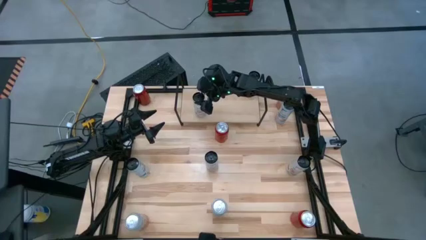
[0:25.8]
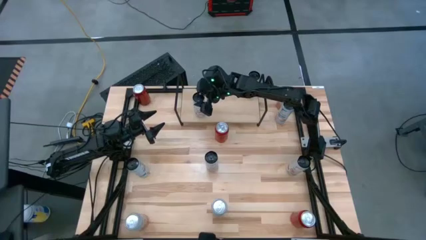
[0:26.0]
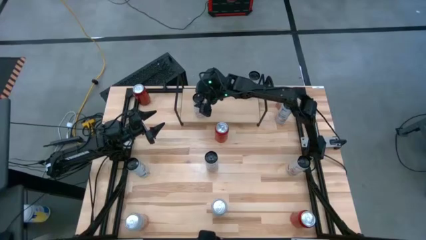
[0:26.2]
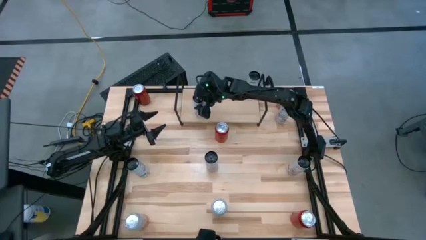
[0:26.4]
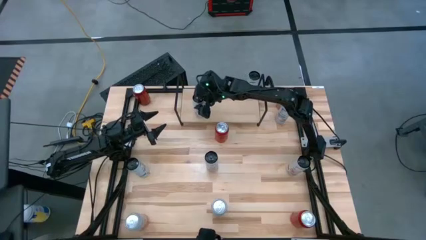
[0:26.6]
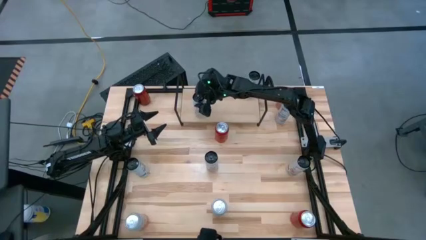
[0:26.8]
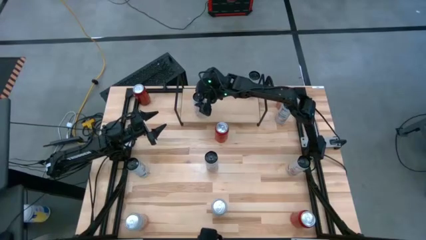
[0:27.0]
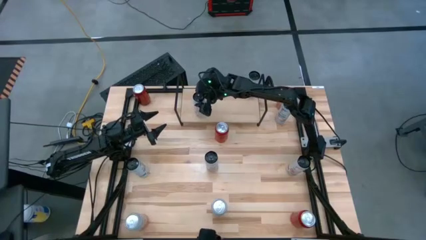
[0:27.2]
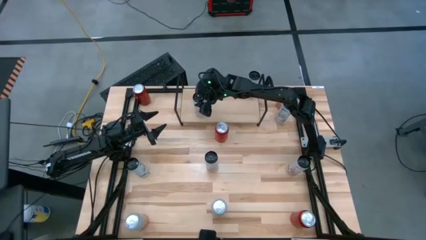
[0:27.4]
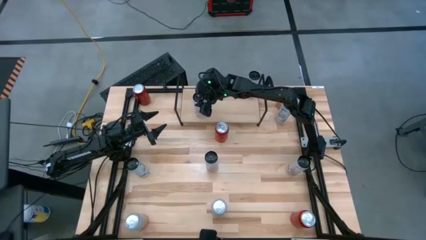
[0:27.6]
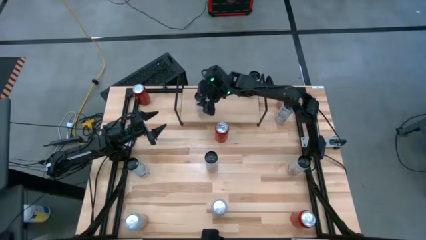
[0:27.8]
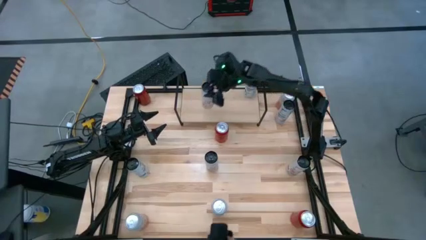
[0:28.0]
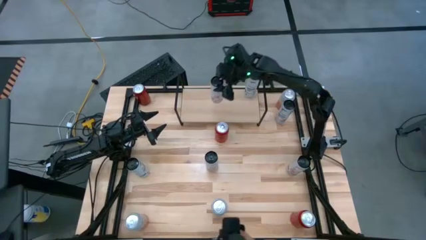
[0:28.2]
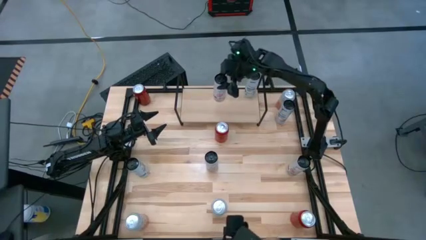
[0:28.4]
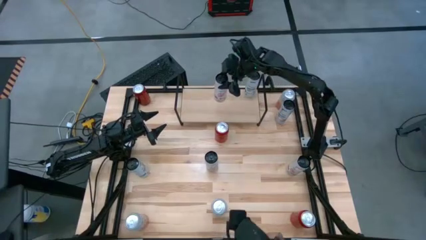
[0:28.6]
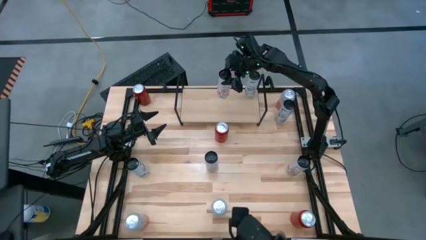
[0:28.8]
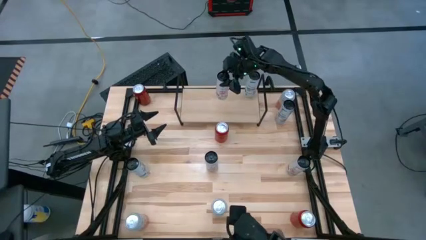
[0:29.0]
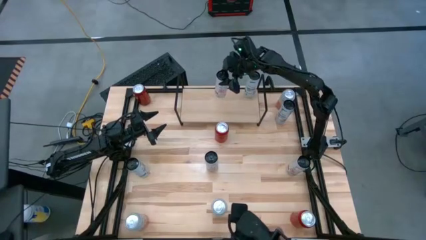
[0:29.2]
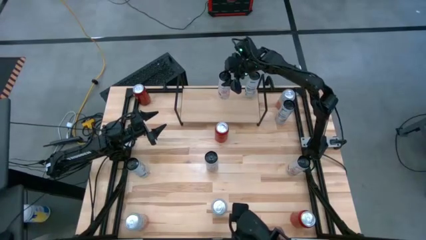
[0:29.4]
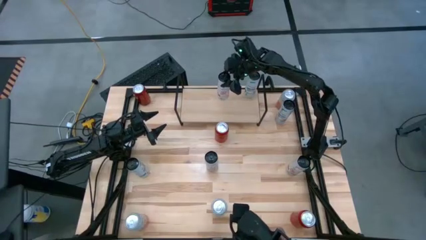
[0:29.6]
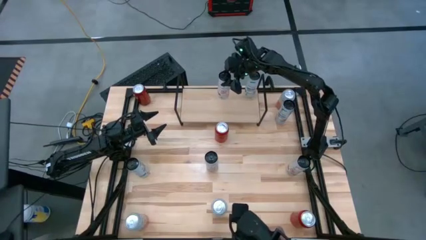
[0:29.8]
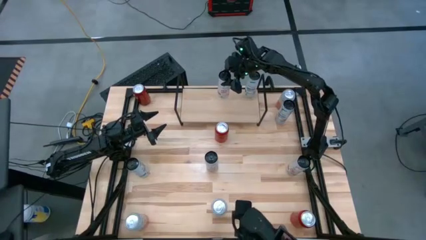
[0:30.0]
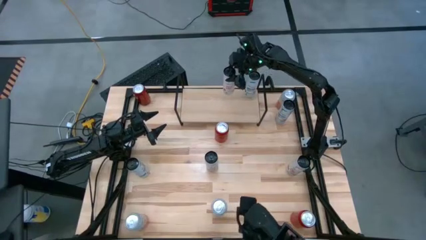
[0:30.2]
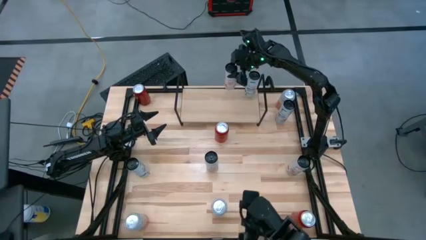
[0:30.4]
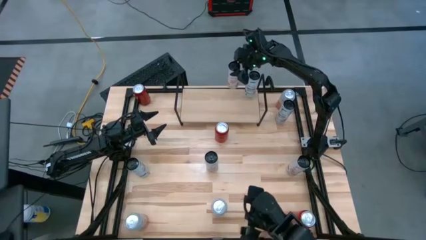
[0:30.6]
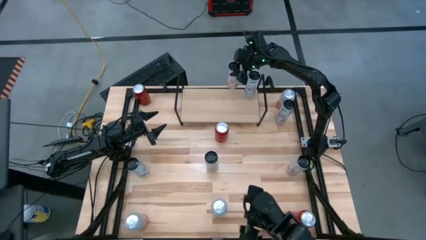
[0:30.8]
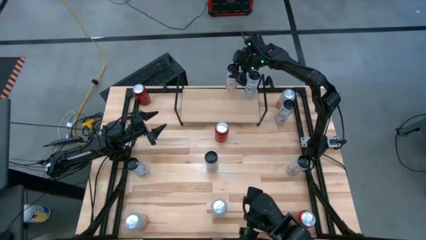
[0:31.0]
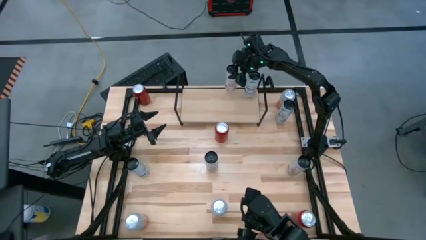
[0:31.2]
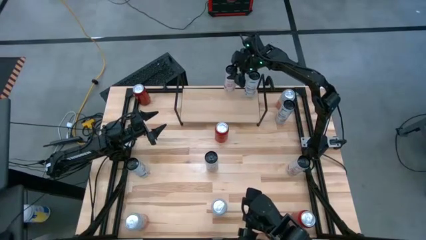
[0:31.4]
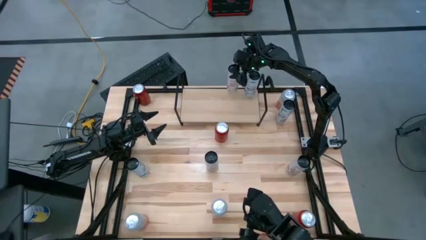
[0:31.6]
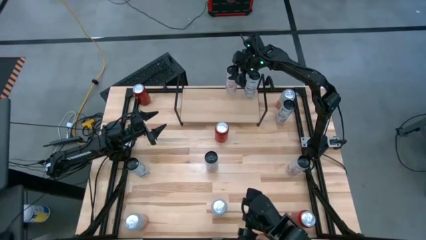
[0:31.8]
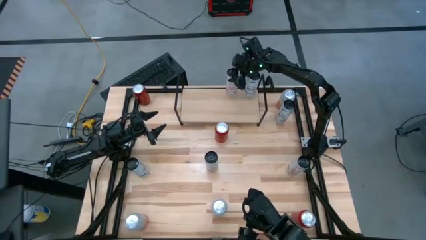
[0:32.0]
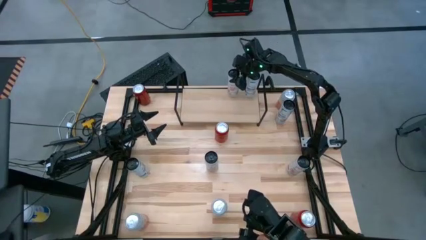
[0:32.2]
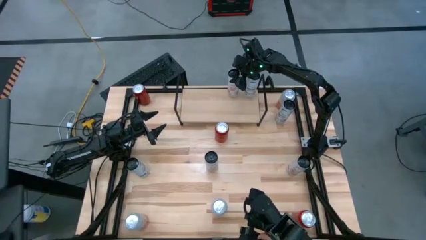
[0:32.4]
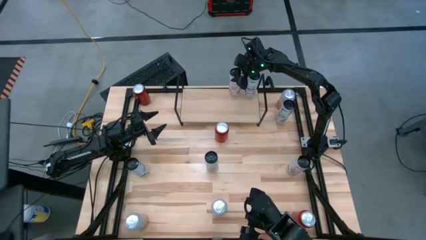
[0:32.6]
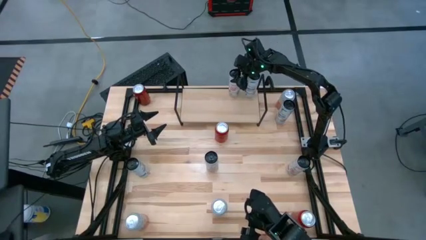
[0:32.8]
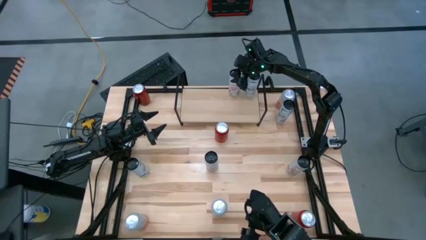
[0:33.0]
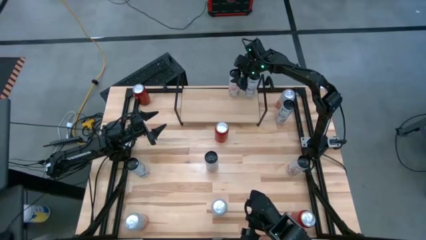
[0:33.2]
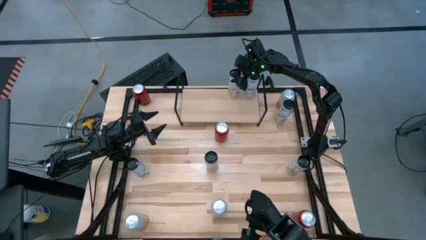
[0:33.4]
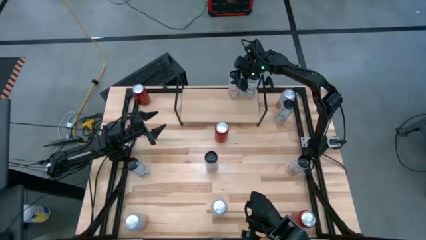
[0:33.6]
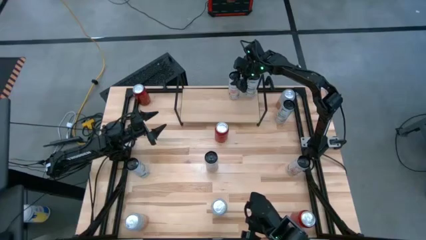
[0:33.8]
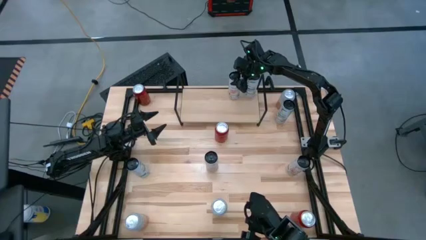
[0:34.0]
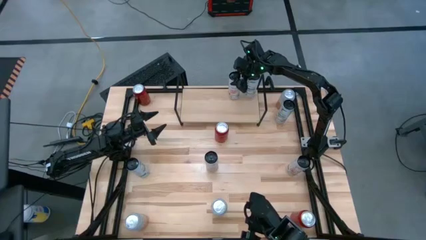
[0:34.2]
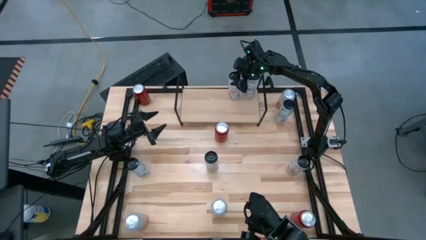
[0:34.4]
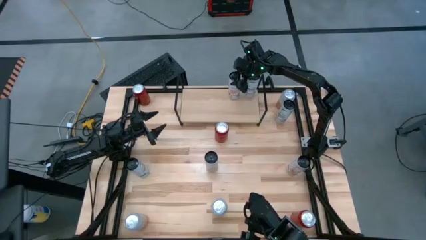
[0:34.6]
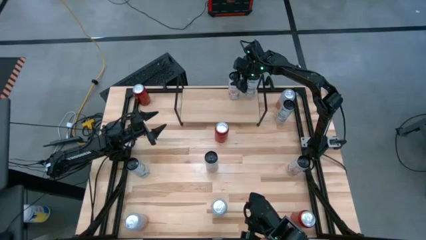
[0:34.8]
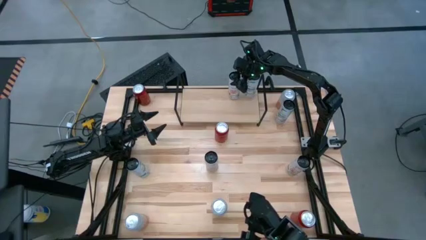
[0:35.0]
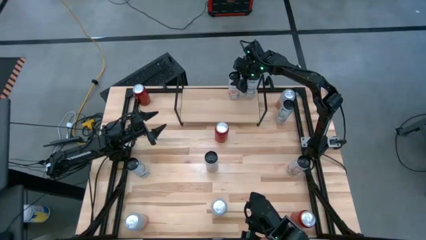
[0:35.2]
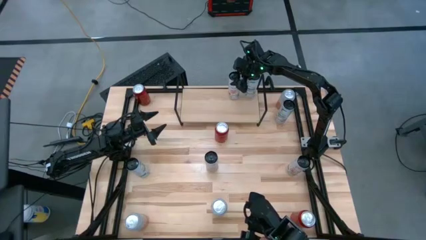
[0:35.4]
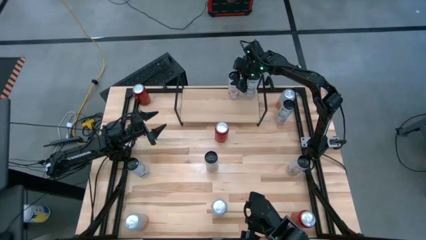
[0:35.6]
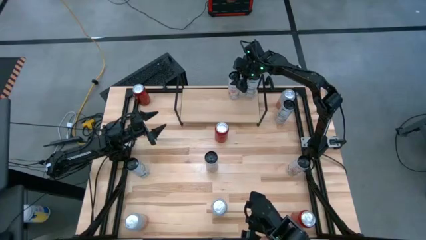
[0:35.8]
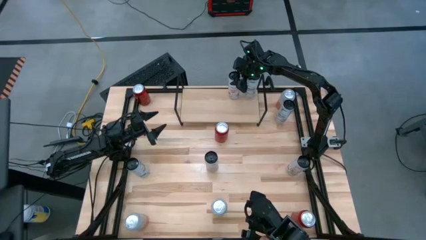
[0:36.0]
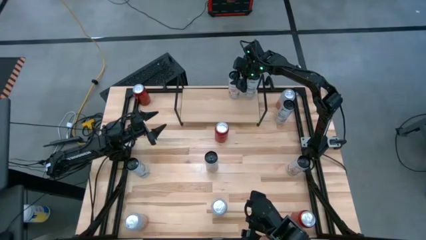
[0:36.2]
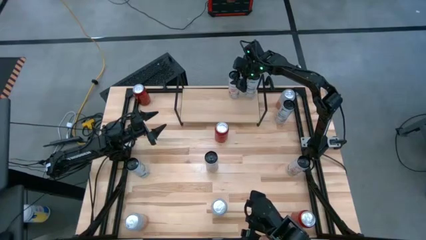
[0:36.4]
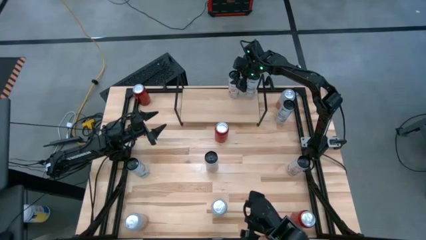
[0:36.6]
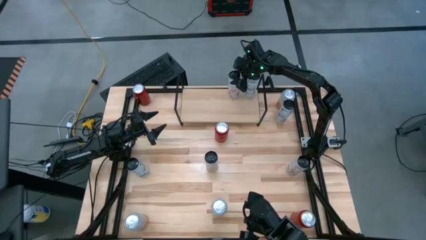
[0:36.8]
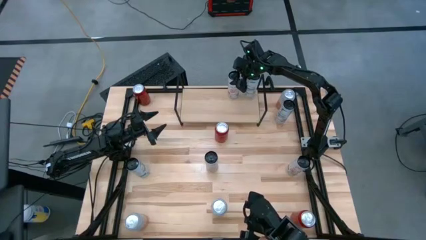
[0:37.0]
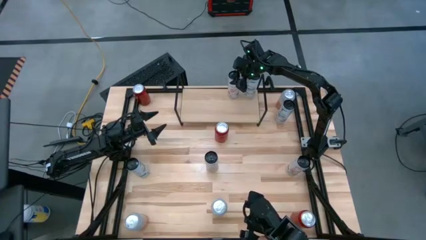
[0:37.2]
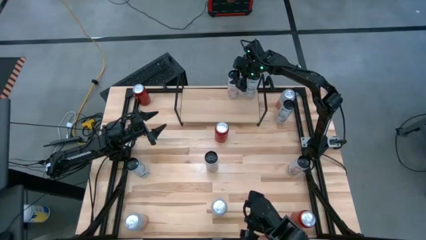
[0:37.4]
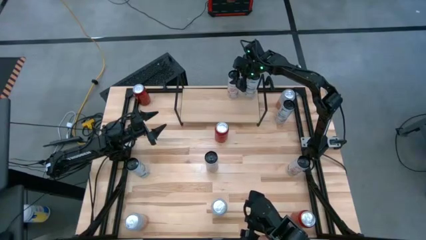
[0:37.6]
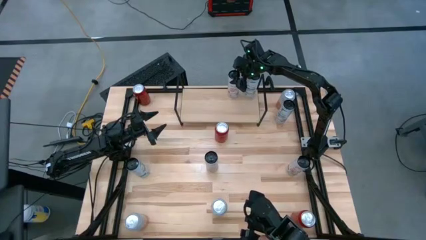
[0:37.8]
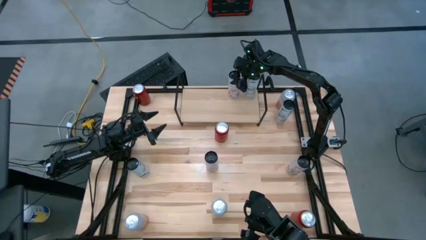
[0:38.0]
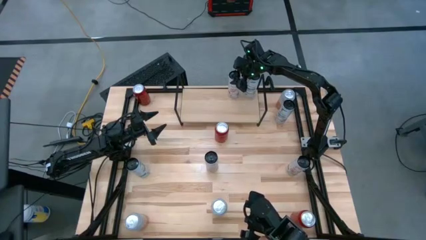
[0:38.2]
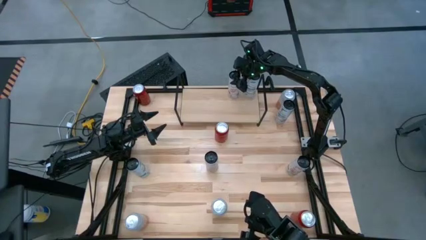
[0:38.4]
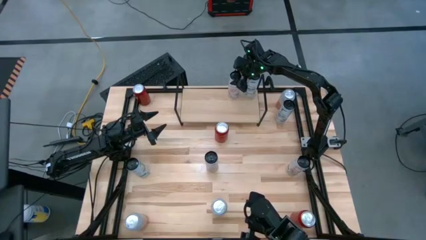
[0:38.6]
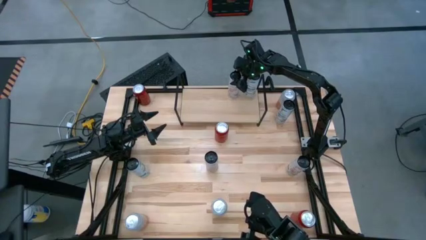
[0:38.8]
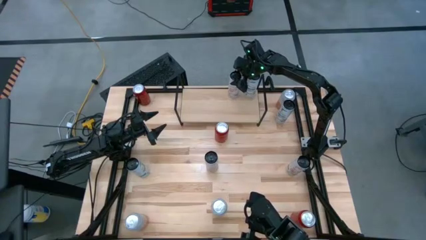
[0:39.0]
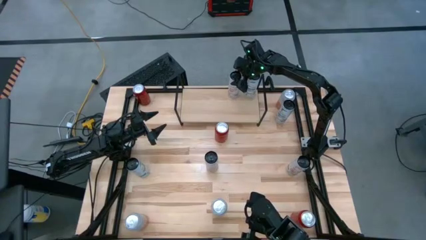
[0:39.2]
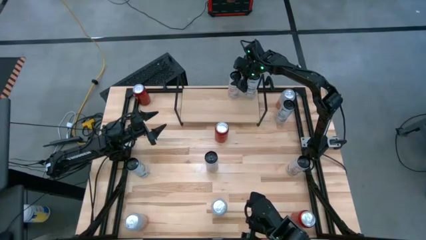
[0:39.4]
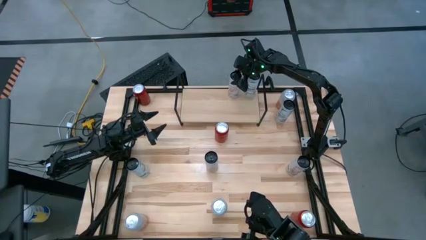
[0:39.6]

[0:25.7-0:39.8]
Task: Place canned beverage on shelf
Put the top left white pink soda can on the shelf

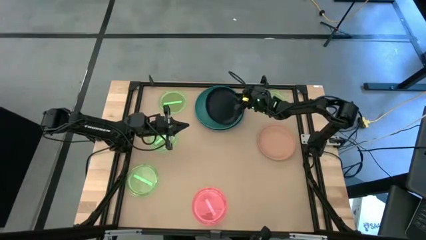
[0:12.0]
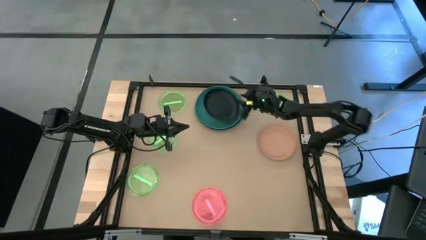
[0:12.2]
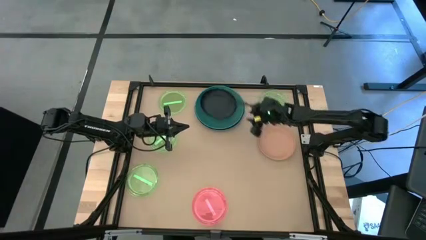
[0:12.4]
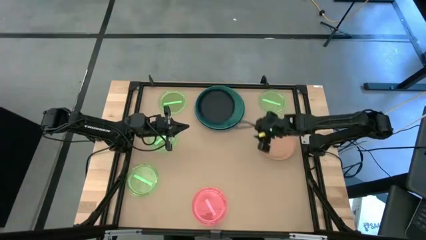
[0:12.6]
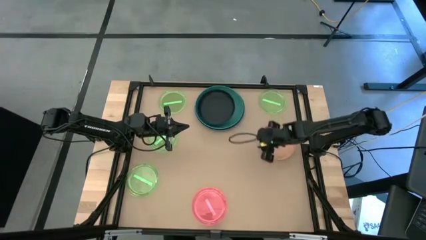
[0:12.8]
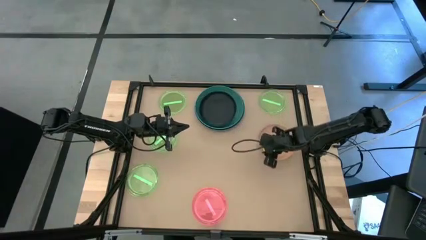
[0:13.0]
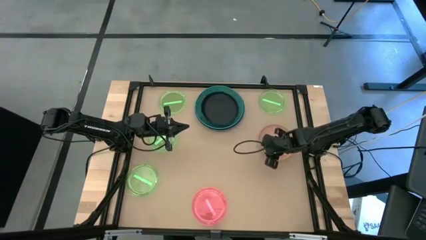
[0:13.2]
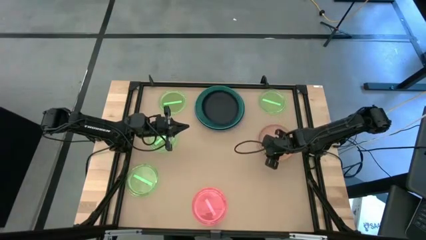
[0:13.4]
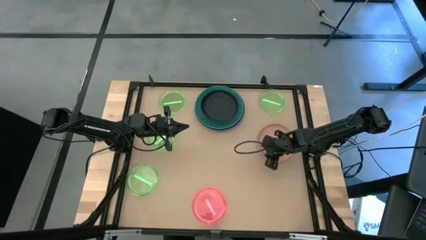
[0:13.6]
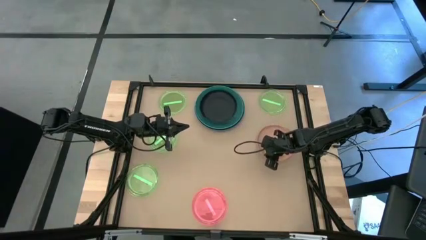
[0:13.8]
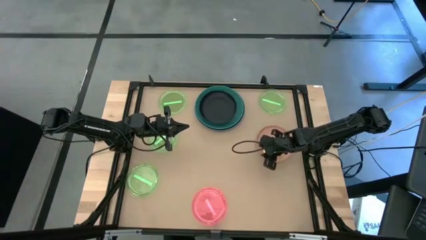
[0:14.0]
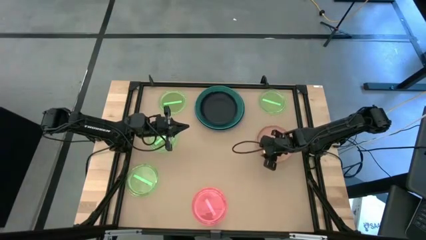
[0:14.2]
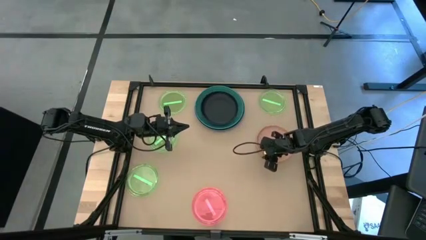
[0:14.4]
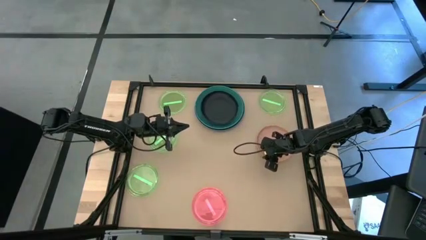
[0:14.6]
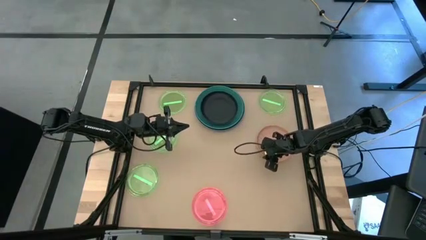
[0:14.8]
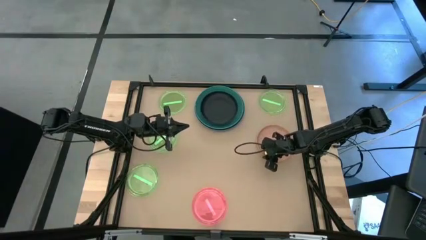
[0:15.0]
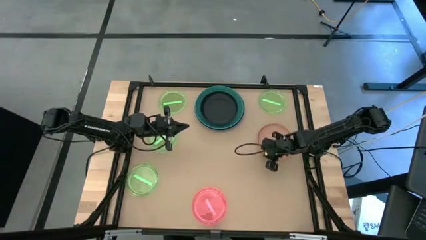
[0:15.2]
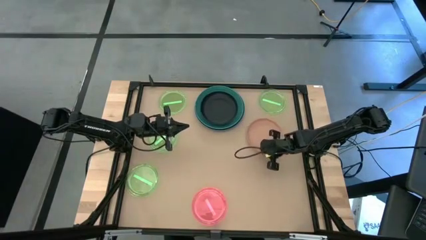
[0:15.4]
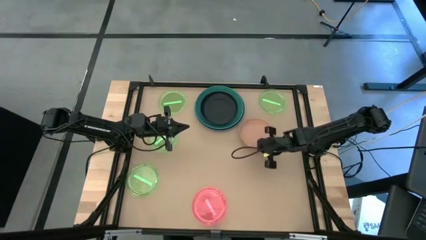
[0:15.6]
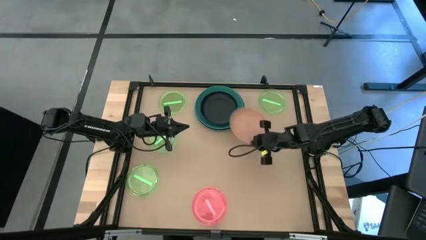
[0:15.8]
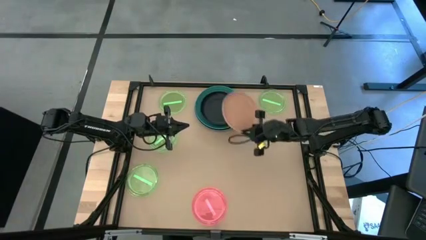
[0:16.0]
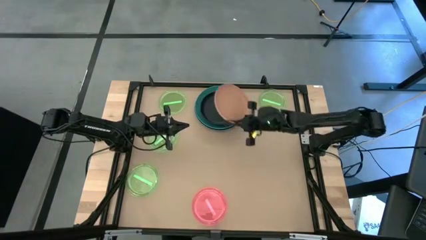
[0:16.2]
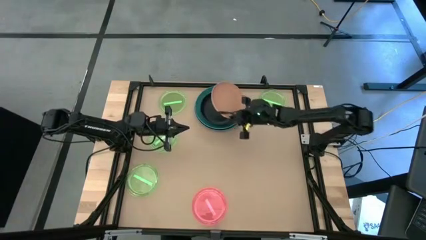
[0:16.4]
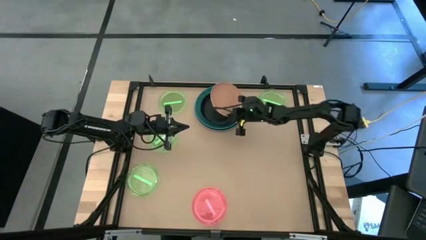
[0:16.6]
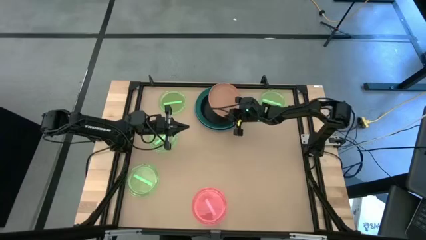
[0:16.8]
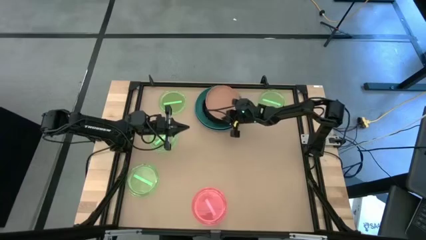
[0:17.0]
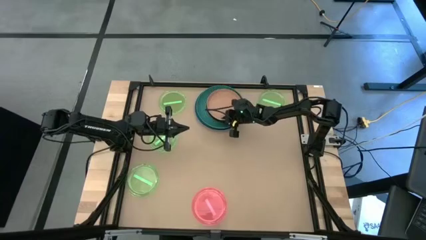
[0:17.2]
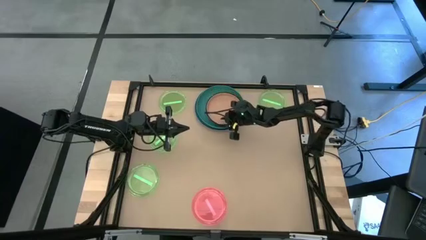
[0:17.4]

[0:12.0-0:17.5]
Task: Stack plastic plates
Stack the orange plate on top of the black plate
